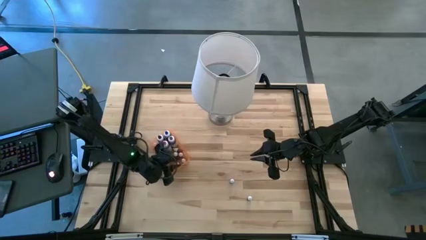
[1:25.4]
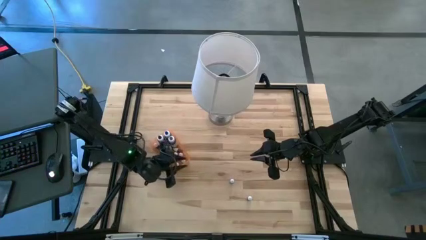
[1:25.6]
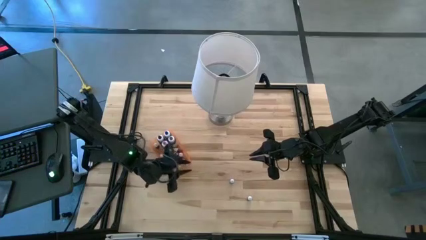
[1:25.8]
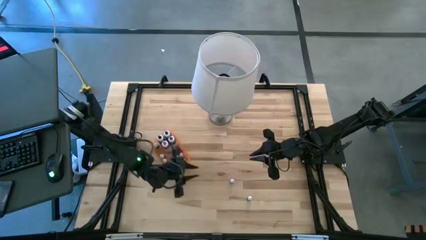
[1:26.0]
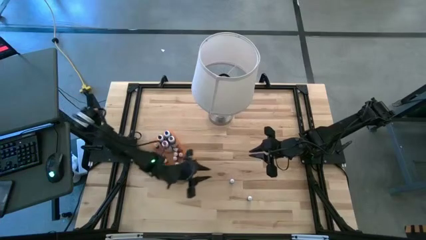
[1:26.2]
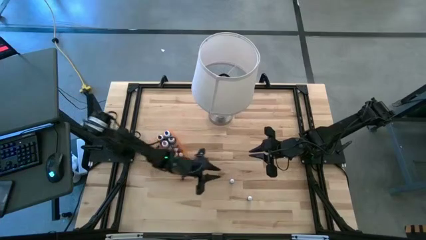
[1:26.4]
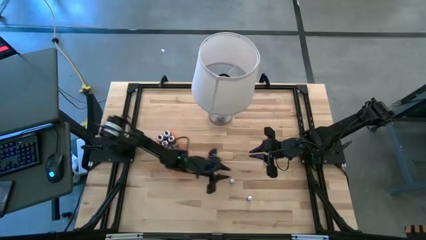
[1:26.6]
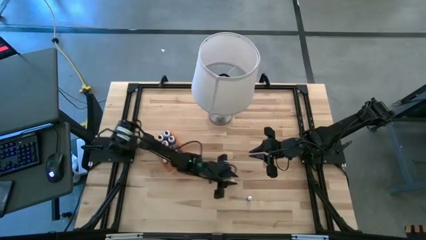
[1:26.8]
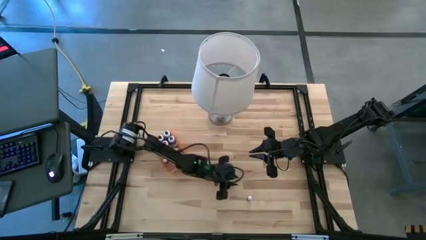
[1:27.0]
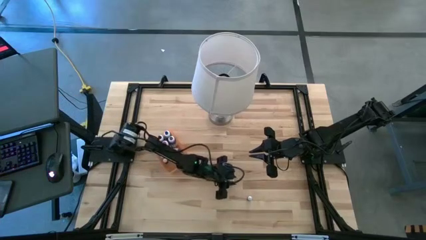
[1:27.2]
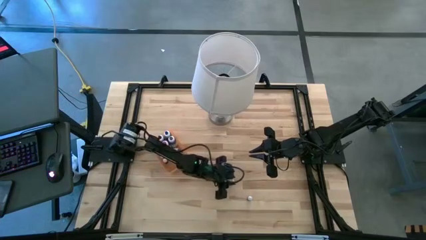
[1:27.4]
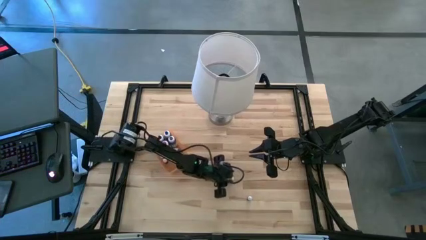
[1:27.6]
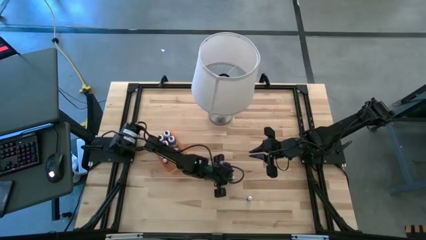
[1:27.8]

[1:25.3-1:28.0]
Task: Pick & Place food coloring
Put the red food coloring bottle into the orange bin

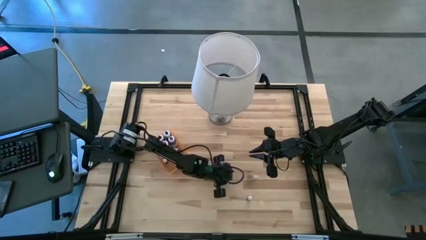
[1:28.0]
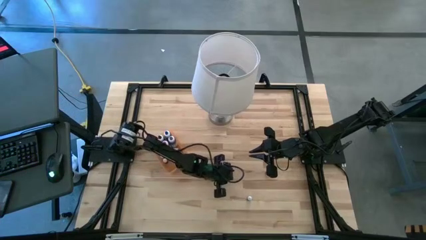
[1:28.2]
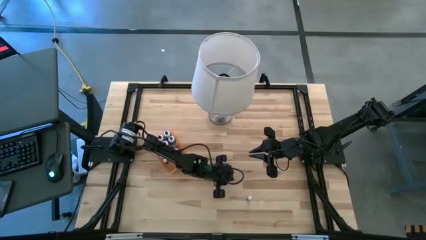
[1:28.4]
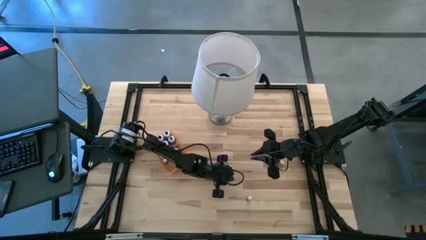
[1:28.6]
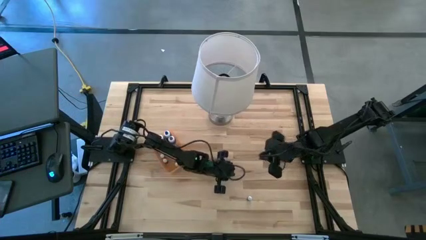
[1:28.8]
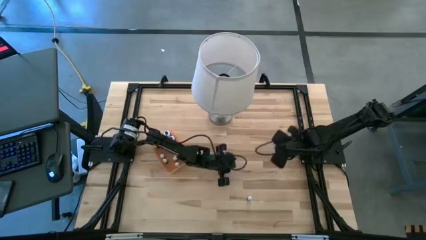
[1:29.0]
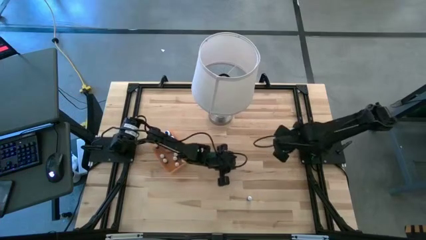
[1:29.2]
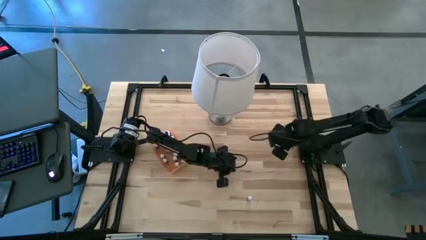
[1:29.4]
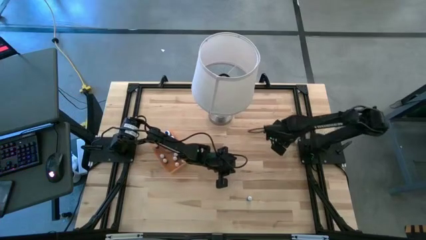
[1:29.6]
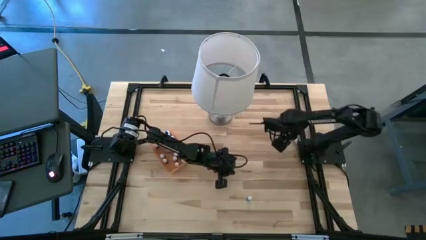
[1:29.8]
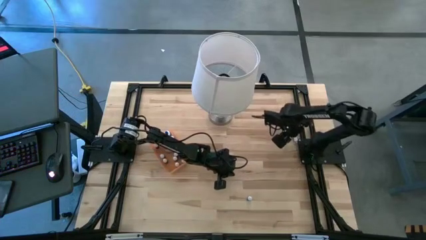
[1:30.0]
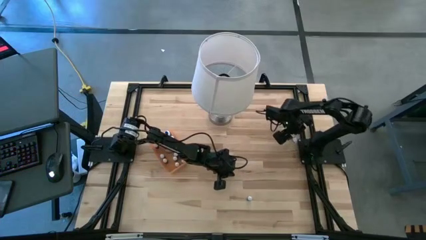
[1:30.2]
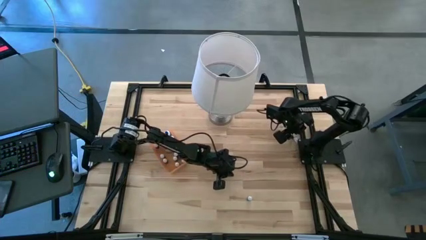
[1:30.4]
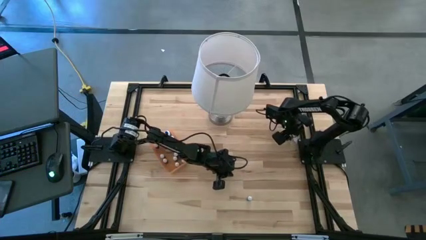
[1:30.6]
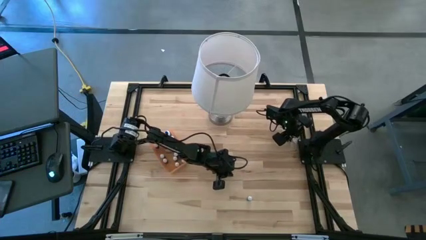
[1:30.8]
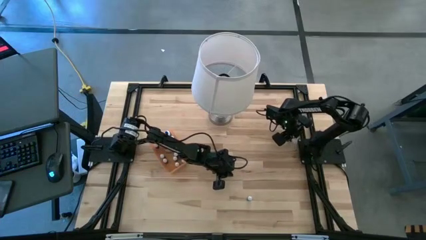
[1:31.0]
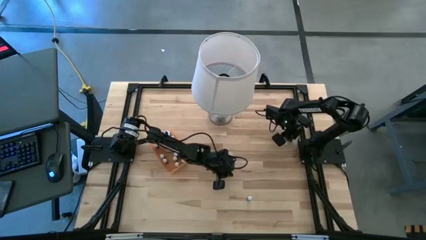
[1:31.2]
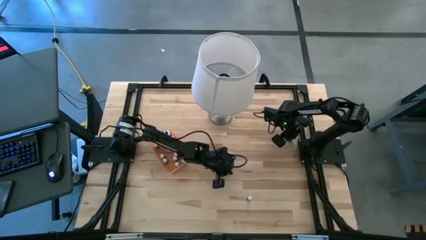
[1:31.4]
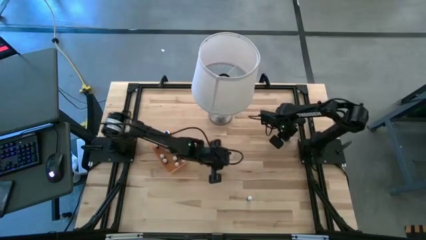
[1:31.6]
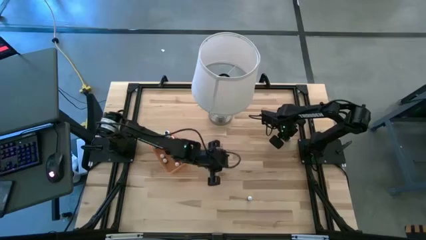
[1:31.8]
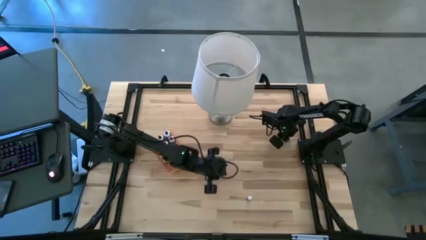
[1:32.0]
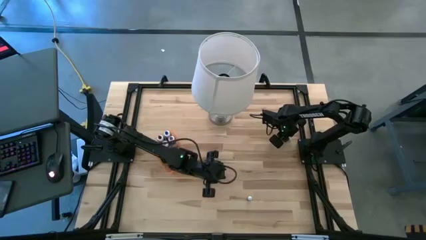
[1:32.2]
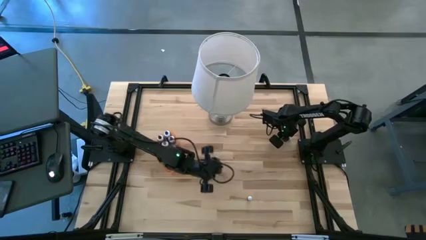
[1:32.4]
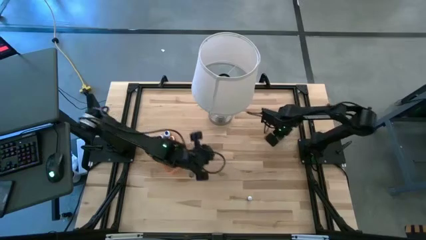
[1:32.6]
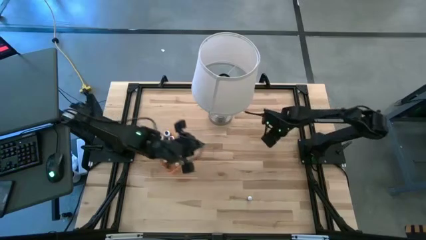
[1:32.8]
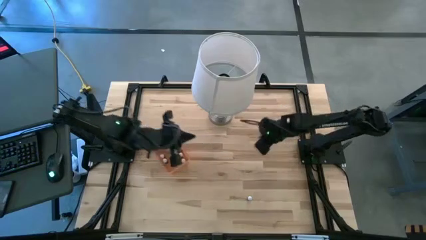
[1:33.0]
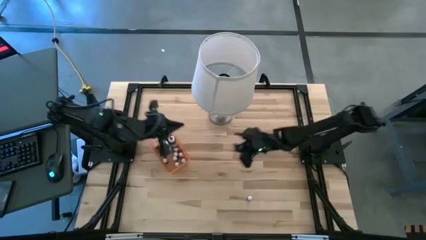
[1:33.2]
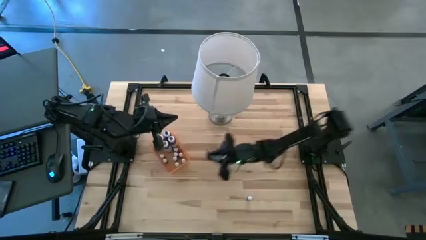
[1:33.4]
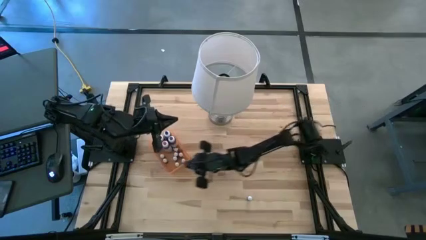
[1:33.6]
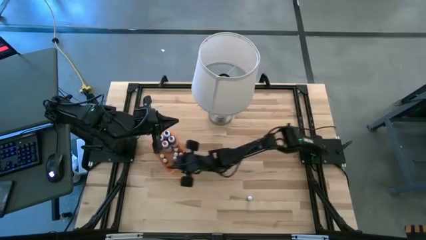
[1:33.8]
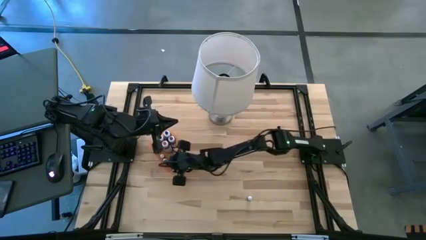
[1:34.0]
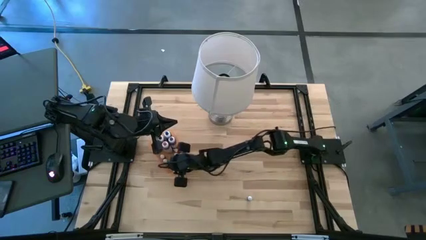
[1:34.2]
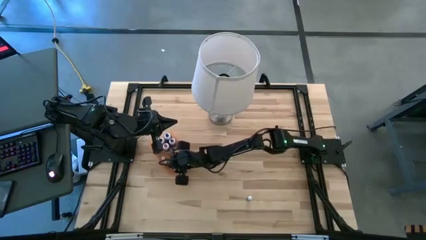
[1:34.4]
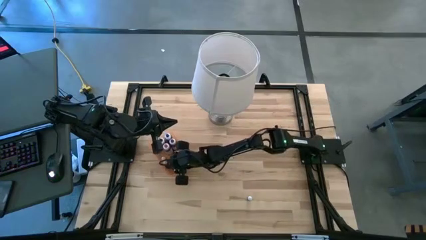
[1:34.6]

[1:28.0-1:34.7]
Put the red food coloring bottle into the orange bin

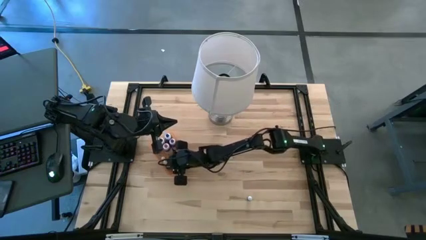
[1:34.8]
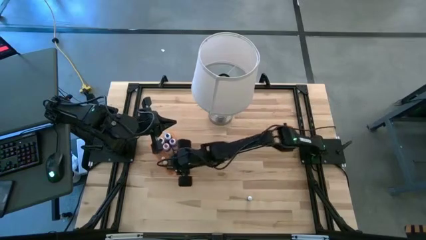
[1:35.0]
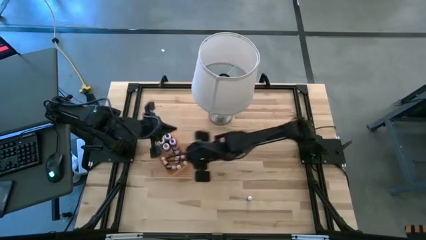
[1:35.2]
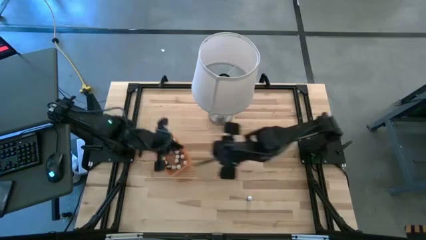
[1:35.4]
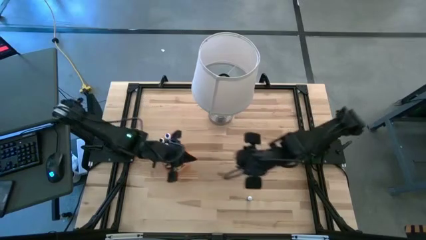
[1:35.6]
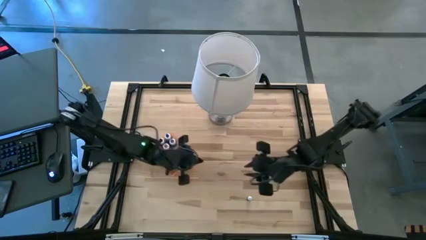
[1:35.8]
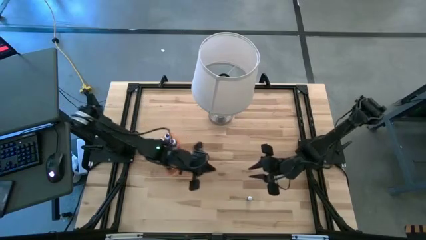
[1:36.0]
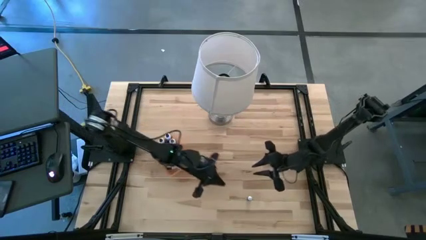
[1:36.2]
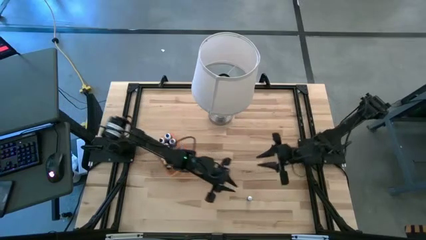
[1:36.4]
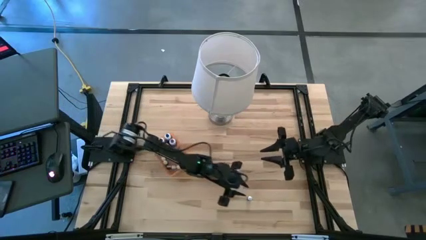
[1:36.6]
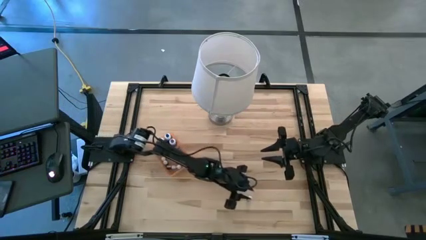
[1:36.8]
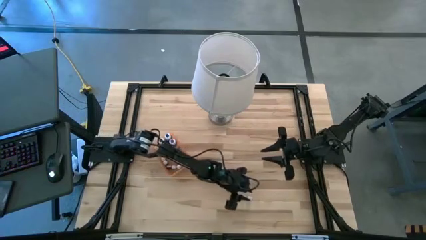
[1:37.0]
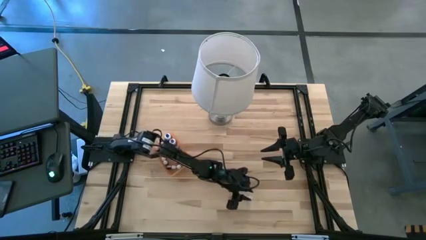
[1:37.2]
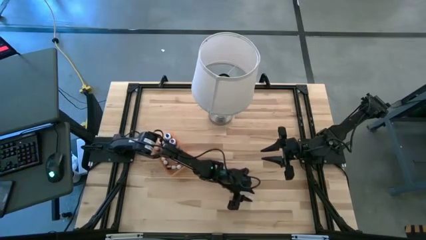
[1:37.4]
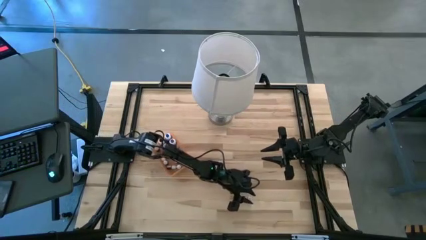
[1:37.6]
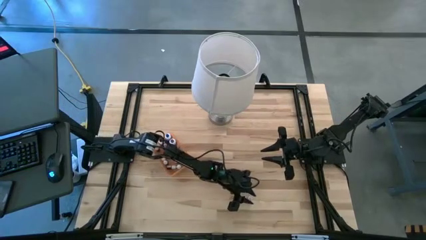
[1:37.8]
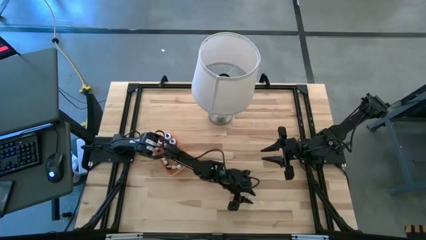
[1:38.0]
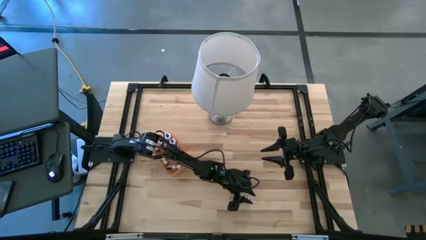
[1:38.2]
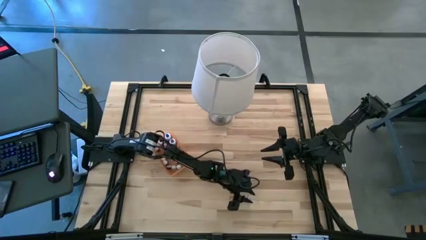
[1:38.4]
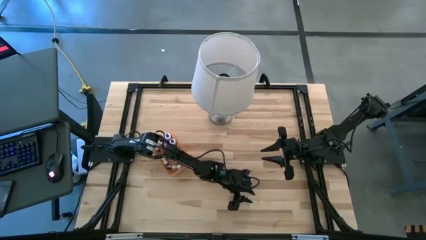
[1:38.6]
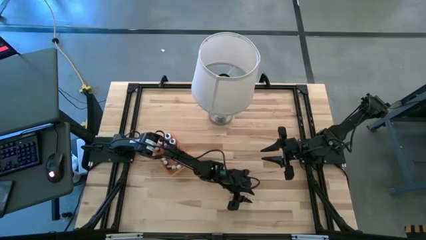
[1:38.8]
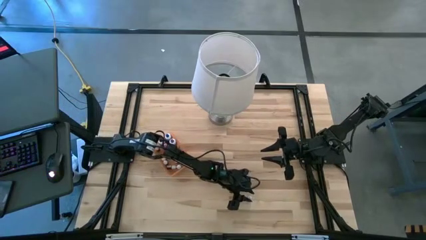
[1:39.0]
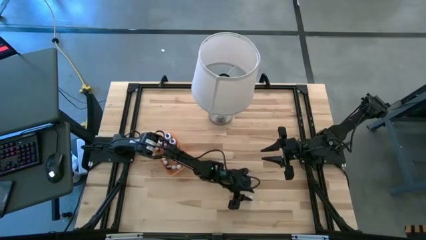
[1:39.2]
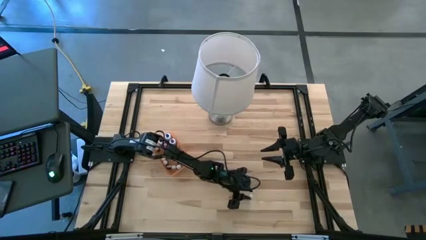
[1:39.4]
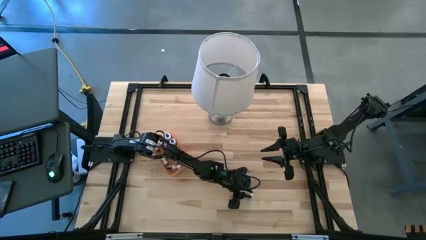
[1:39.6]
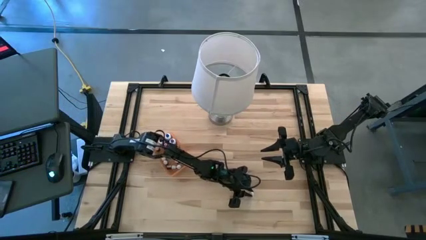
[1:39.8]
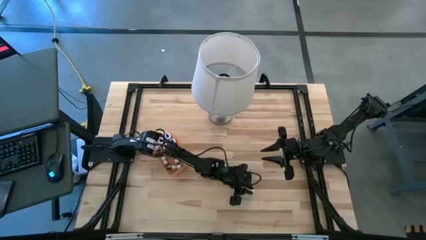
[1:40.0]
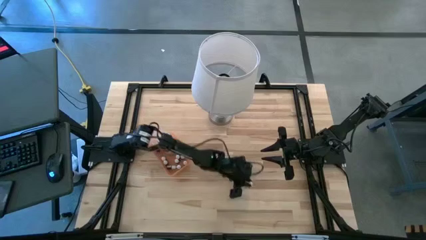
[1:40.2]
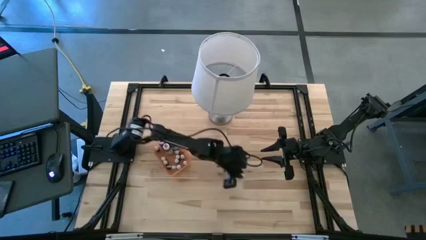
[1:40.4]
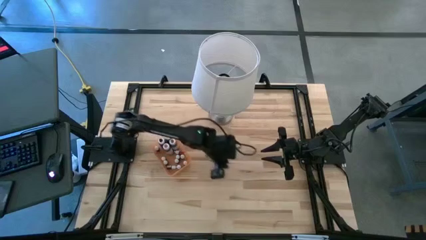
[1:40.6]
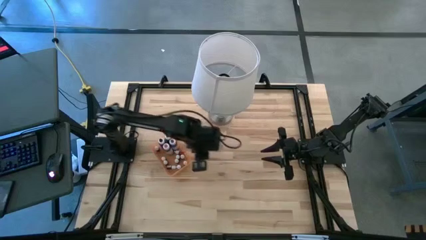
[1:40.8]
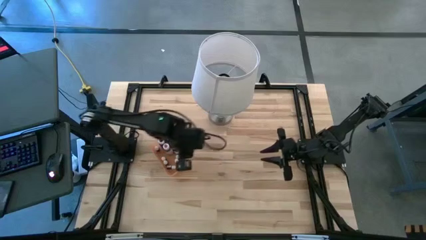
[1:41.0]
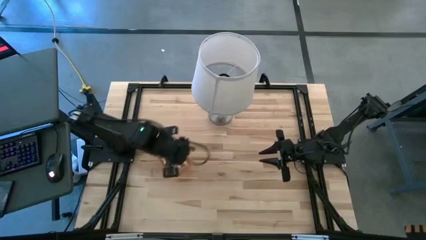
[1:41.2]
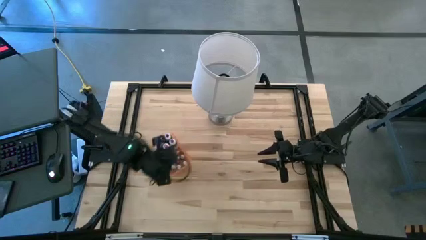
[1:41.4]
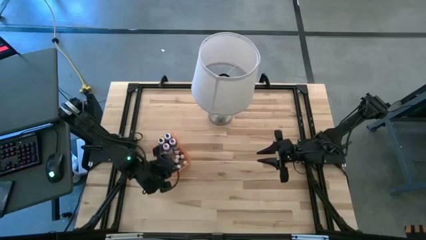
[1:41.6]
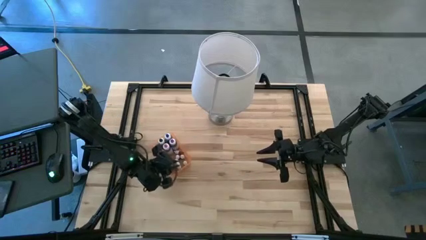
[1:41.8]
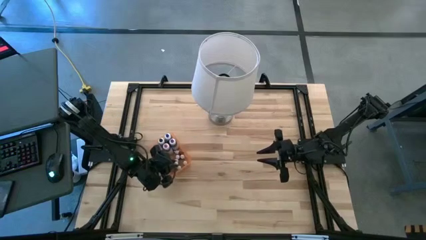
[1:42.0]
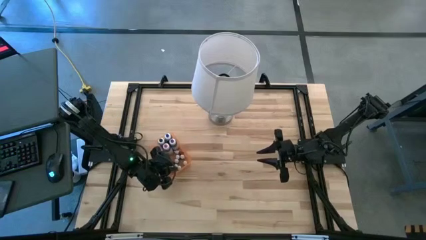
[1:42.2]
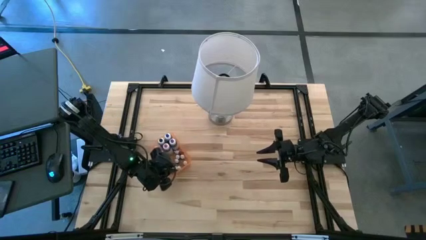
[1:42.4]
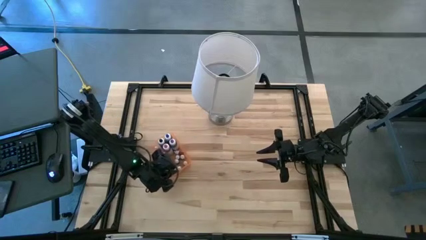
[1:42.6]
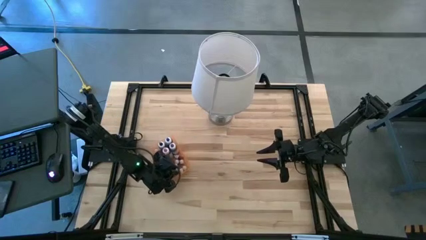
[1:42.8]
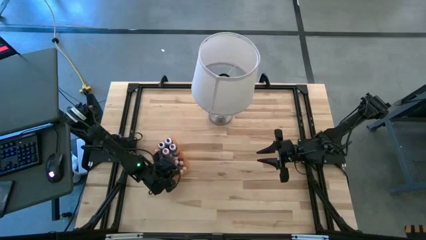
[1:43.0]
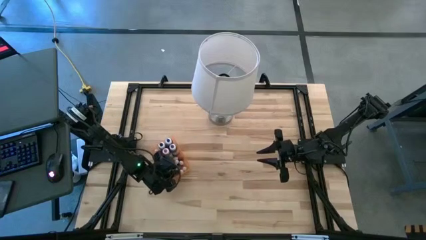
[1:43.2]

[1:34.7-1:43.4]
Put the black food coloring bottle into the orange bin
